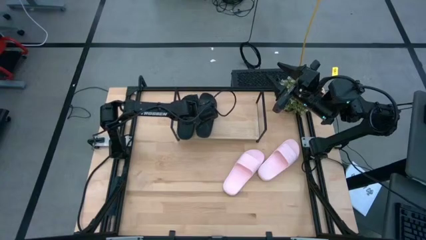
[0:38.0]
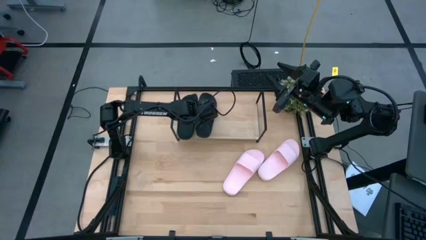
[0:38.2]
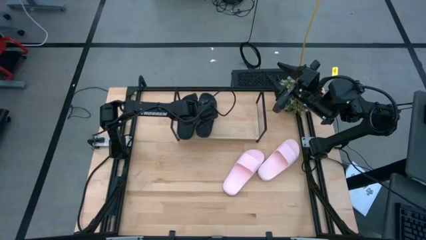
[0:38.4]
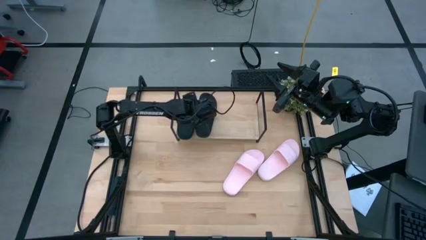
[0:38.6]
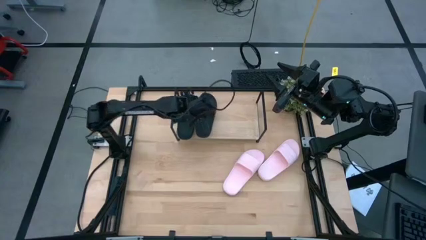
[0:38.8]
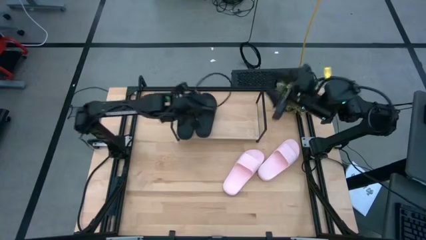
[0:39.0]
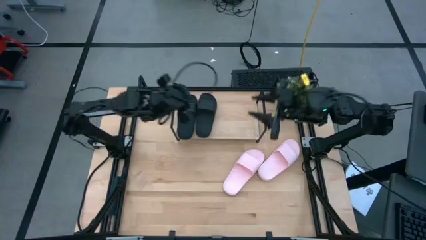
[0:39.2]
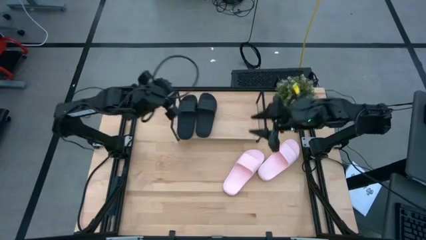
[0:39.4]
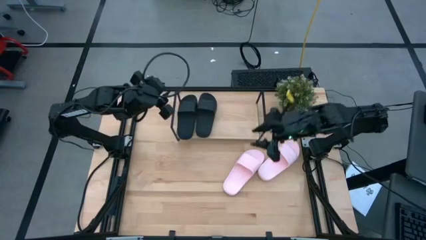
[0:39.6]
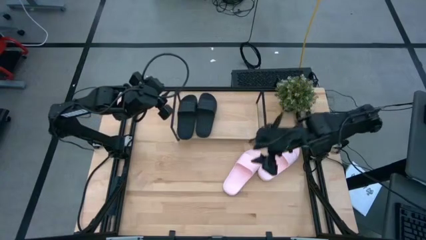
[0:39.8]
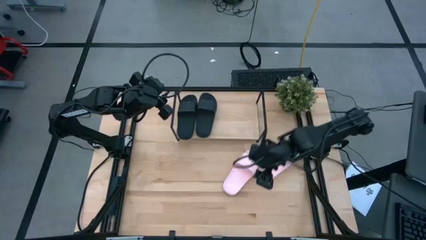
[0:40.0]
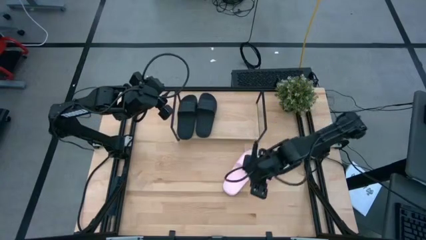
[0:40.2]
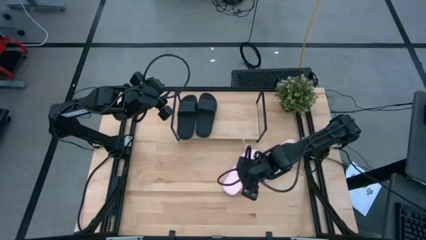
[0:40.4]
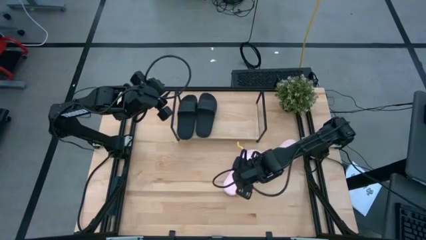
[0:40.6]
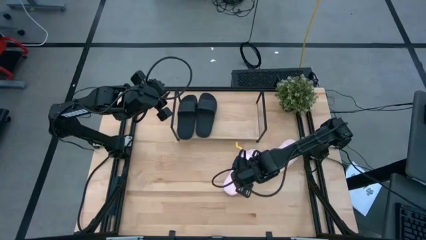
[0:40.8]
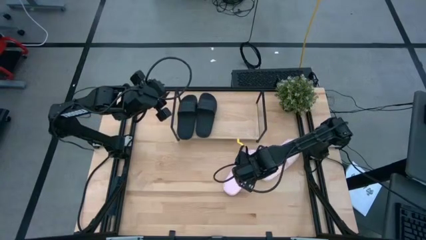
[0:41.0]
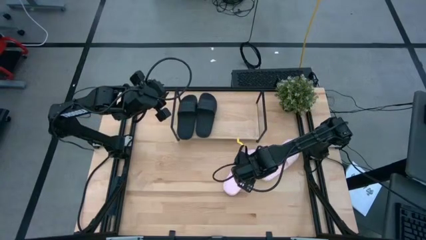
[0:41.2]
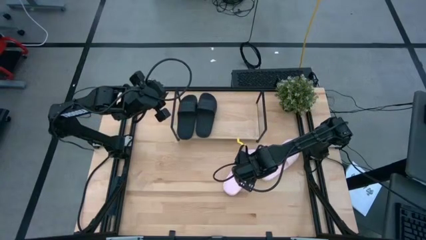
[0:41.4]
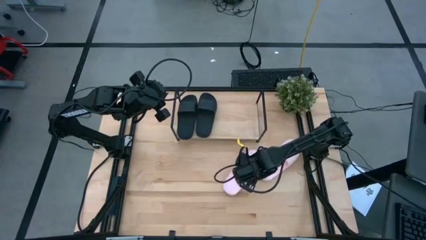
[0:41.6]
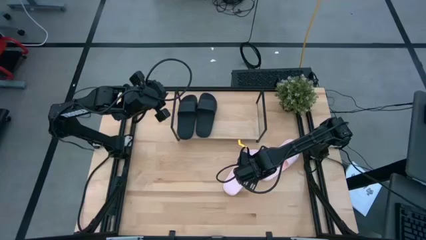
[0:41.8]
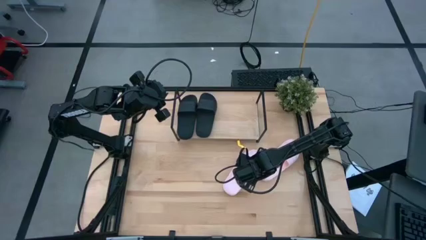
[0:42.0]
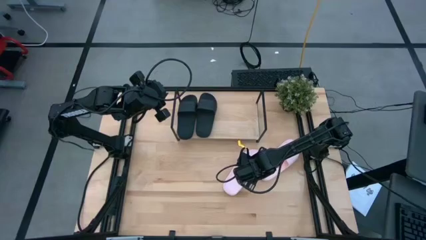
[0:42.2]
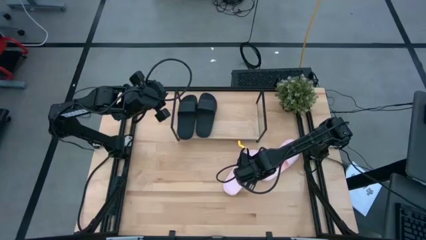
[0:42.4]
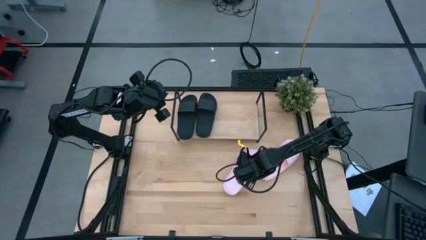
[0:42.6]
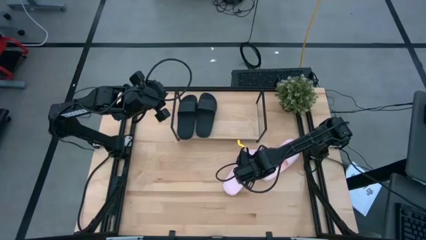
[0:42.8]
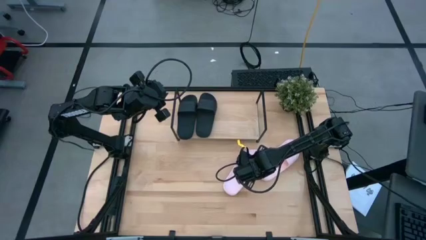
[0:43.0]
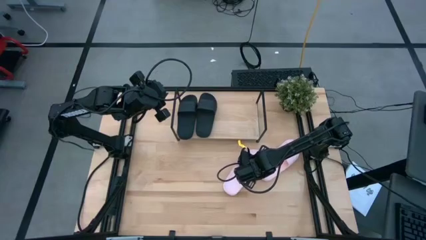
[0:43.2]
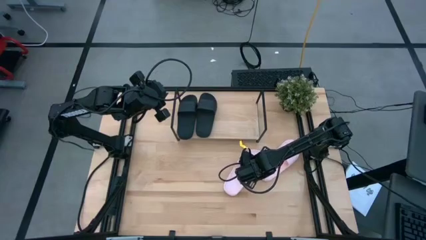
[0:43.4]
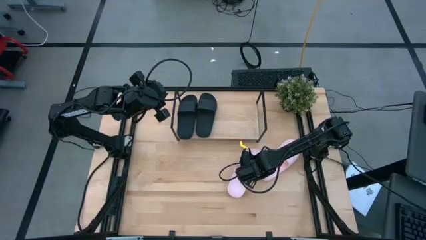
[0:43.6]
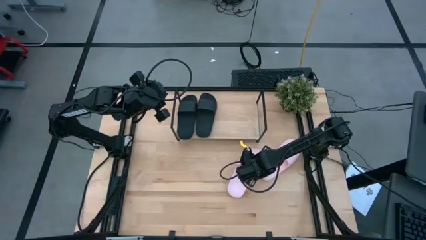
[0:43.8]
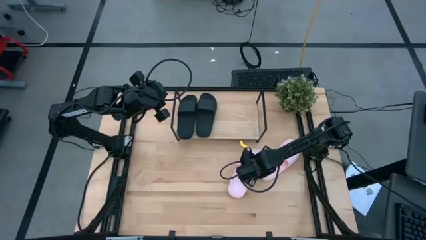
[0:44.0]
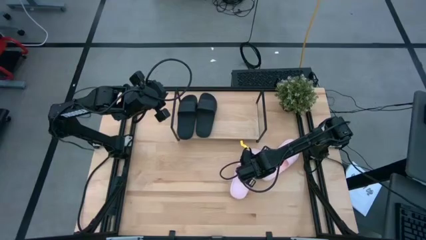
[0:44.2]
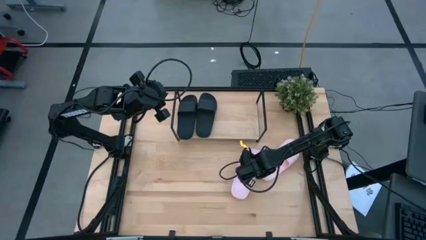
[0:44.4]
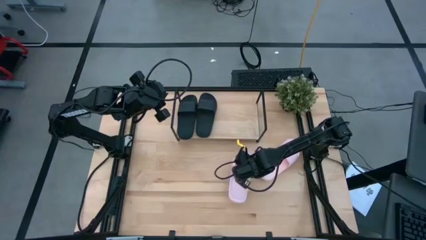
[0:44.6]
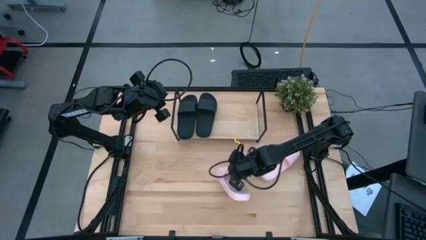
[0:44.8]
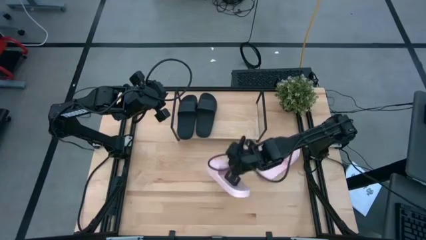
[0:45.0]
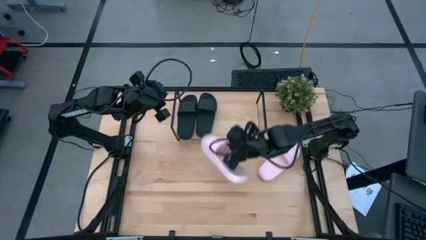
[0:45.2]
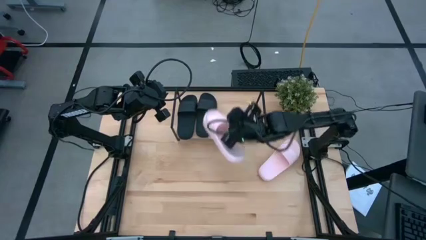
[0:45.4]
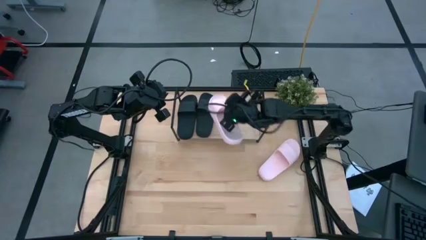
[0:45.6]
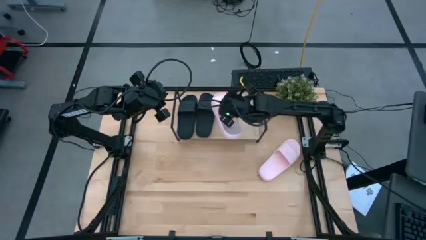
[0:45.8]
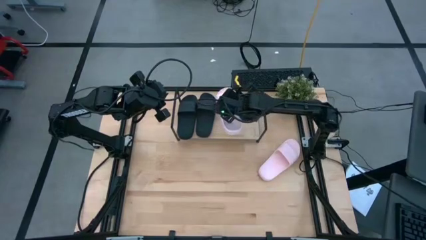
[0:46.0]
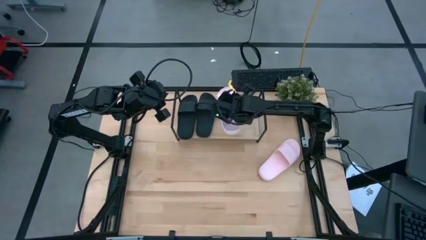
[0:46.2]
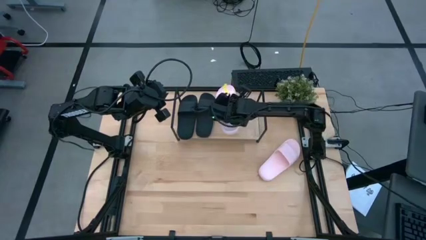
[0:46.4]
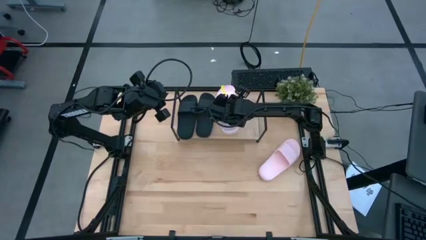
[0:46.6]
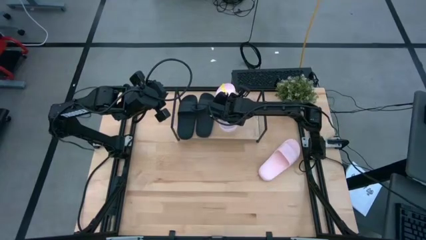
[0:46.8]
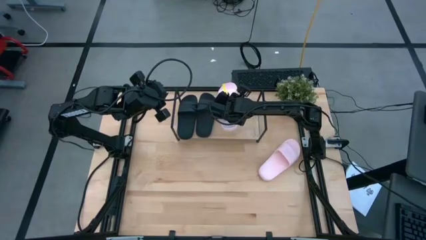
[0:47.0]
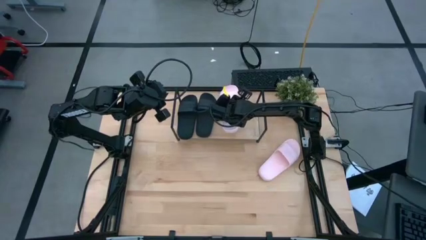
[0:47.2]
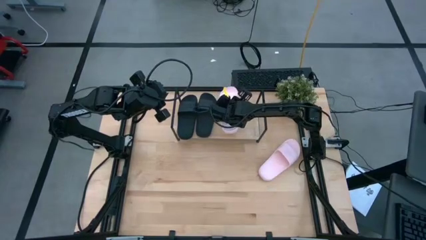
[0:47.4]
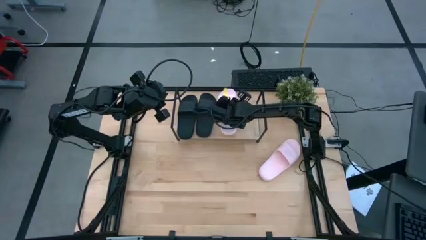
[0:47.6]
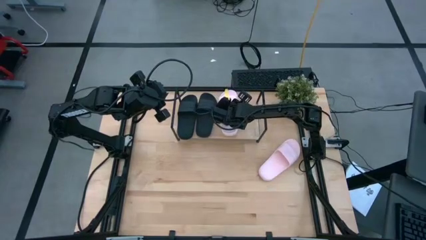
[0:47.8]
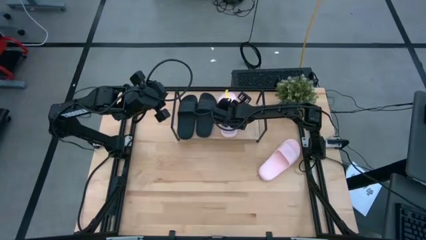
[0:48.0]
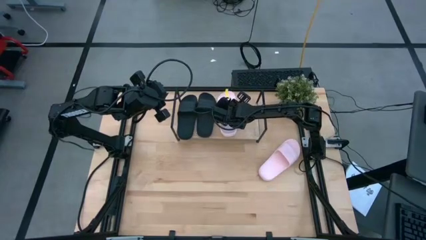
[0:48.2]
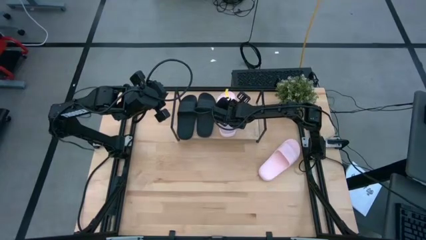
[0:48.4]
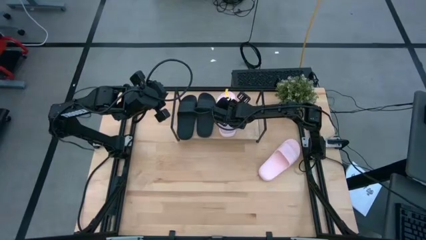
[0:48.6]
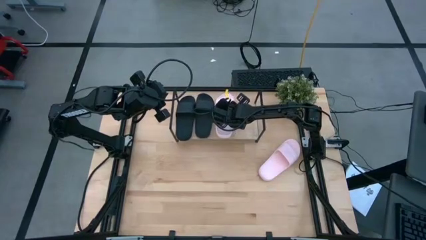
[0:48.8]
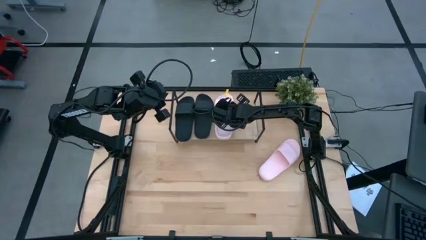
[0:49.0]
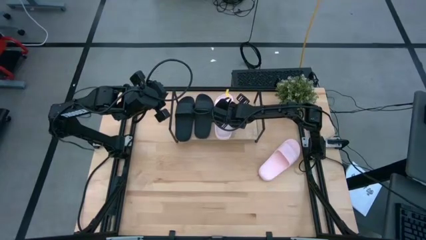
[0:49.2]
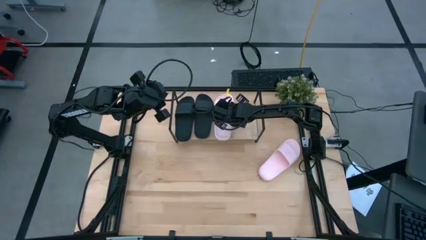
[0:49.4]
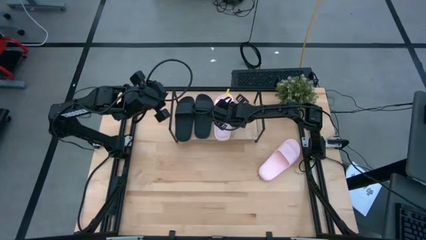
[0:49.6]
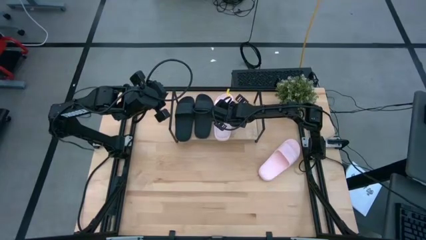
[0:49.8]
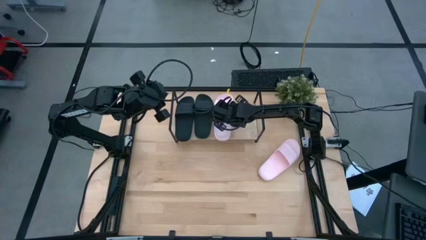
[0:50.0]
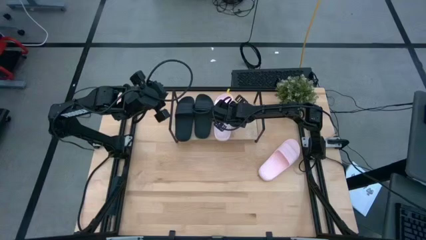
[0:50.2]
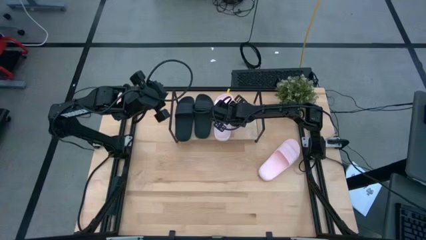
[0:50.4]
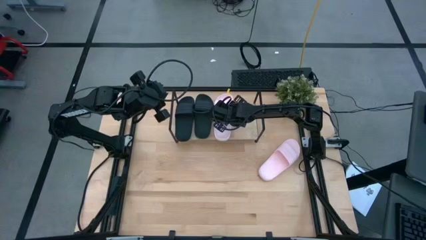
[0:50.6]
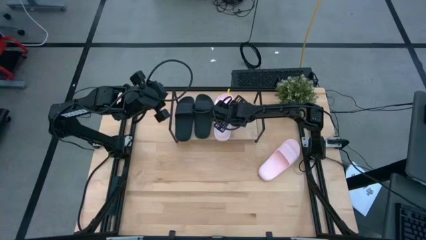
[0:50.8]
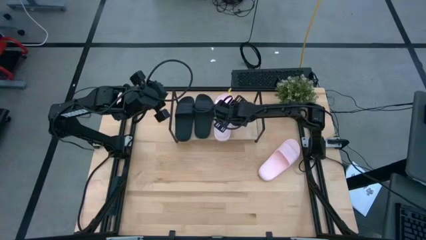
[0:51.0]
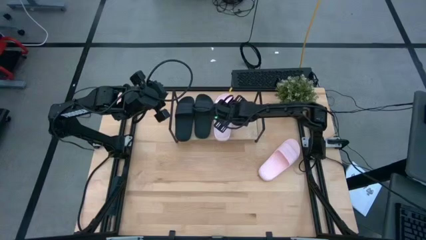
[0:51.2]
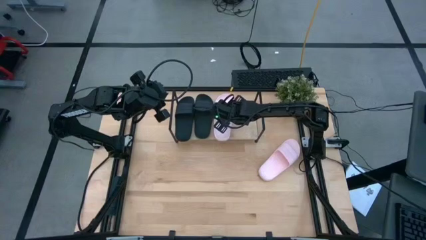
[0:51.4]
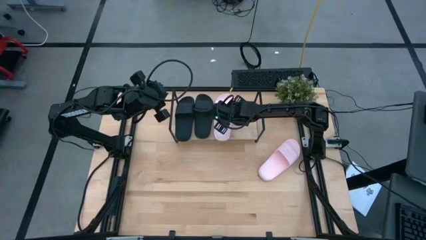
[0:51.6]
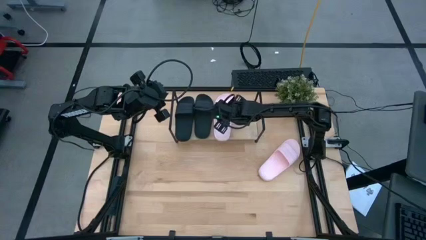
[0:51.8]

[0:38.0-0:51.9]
Task: Pick and place slides into the shelf
Put the left pink slipper on the shelf

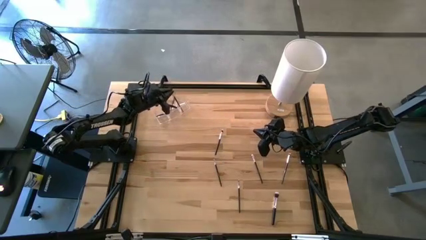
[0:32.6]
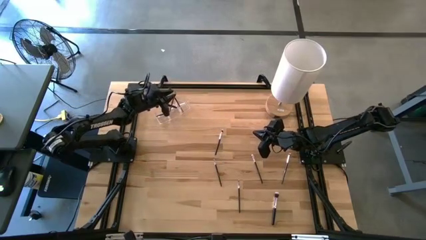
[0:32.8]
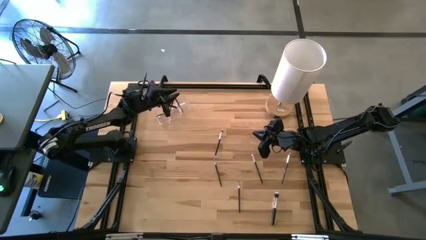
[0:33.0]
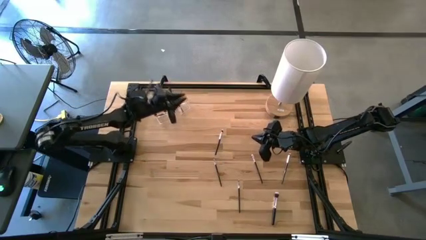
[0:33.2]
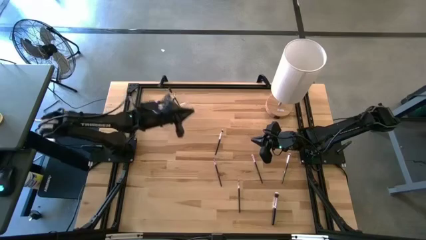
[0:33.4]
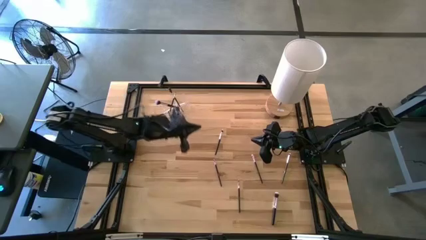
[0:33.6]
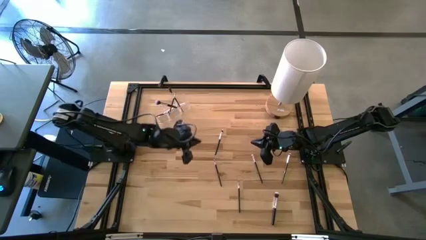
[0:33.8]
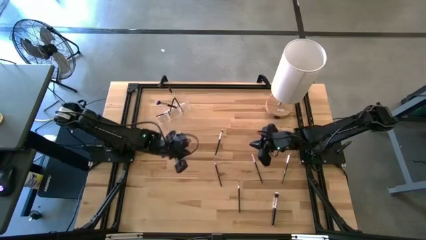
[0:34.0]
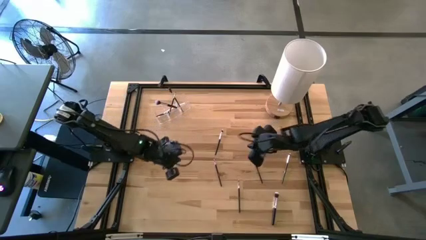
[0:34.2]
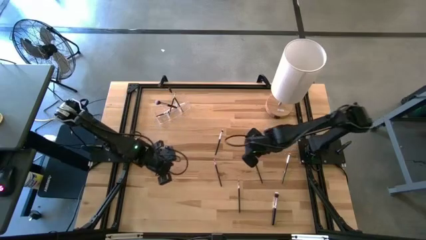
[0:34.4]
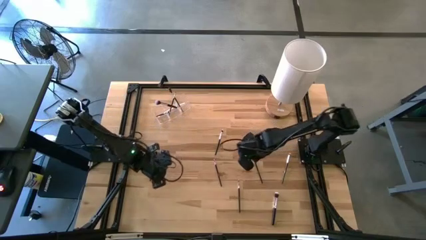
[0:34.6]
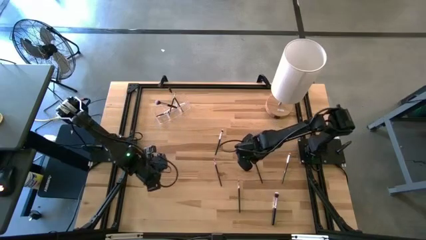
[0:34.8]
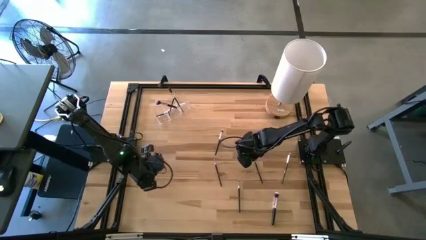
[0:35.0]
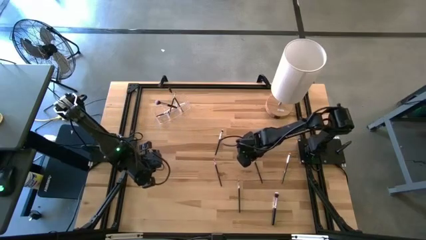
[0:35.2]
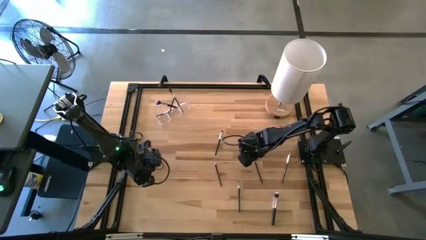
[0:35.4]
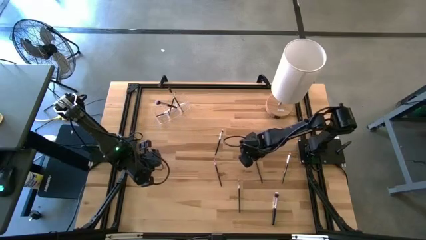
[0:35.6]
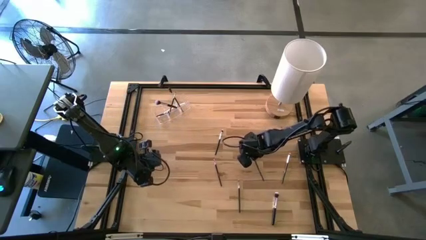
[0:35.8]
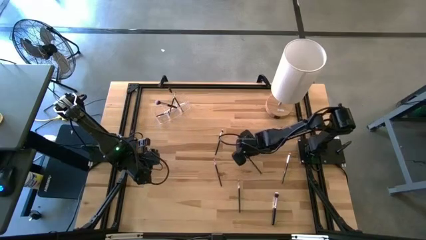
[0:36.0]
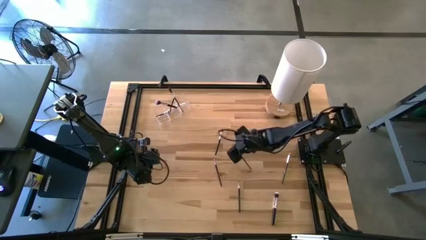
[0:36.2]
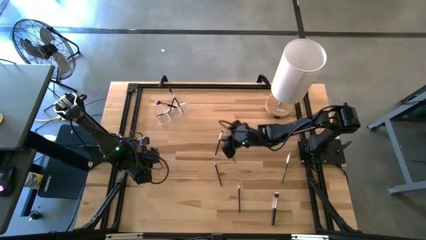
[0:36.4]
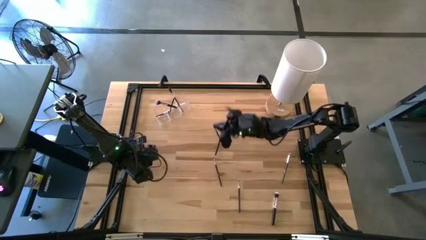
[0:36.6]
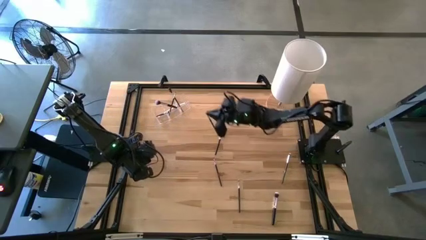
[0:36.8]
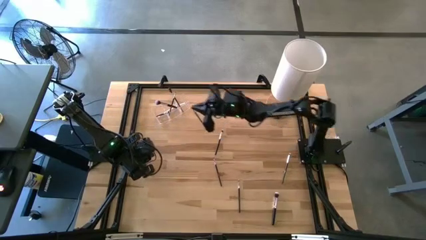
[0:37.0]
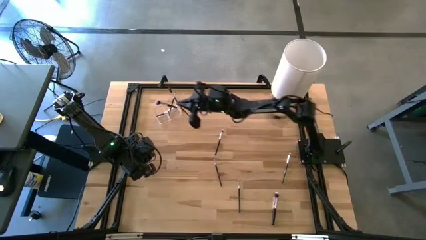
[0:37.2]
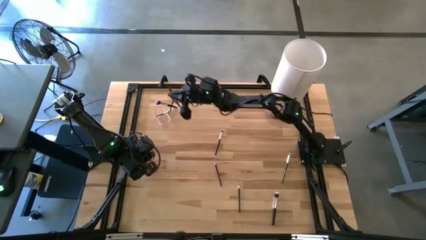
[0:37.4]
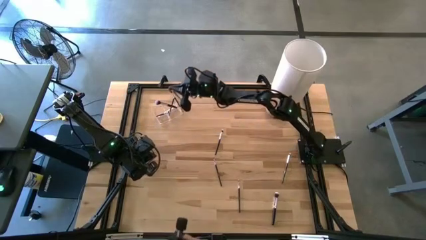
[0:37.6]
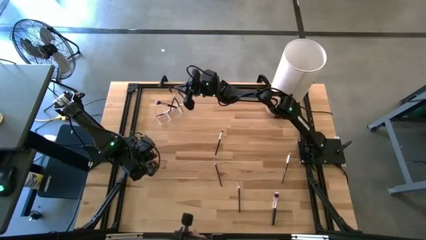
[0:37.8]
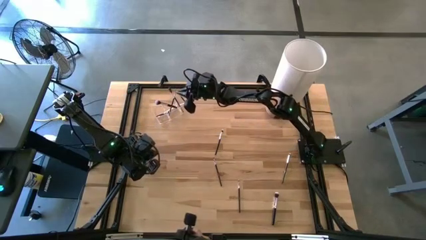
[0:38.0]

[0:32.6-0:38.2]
Task: Put items in baskets/containers
Put the eyeshadow brush into the transparent organizer
